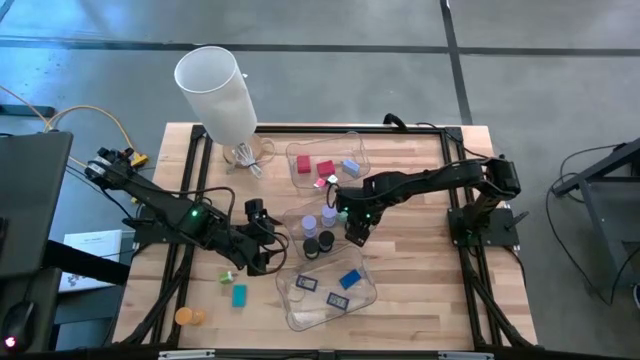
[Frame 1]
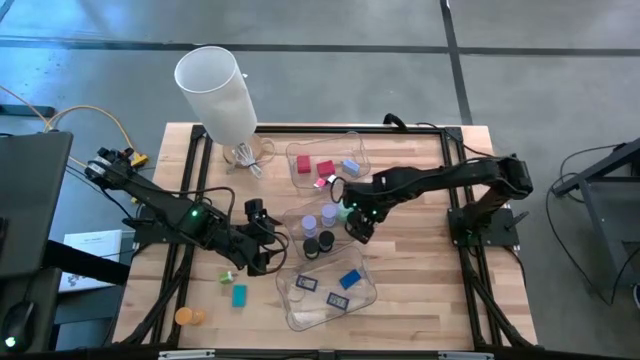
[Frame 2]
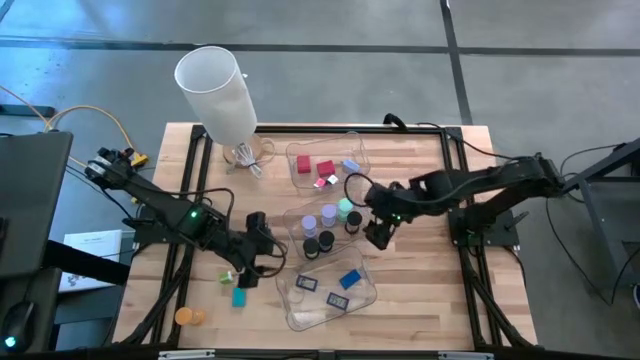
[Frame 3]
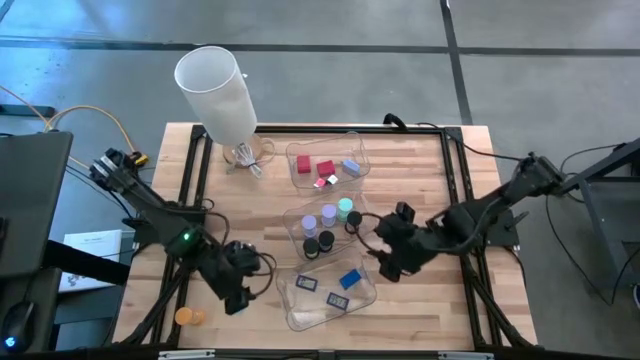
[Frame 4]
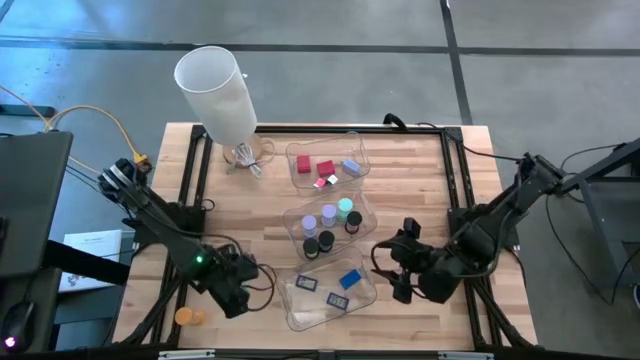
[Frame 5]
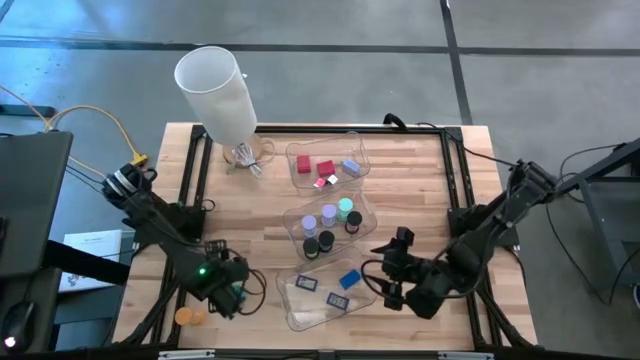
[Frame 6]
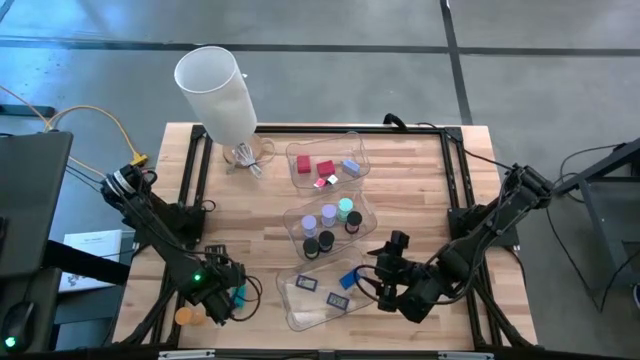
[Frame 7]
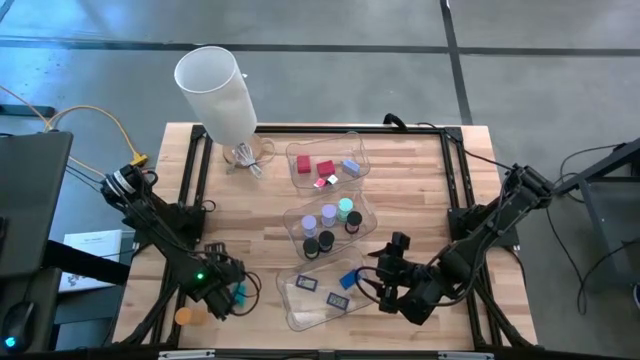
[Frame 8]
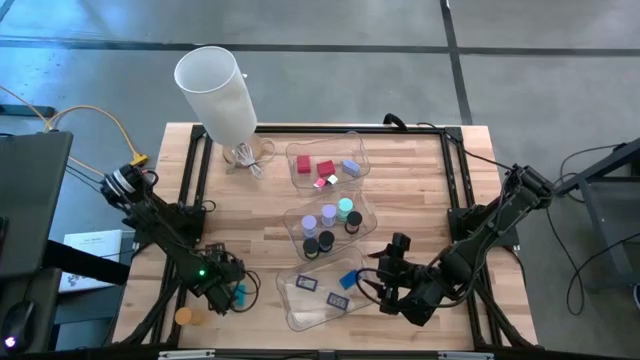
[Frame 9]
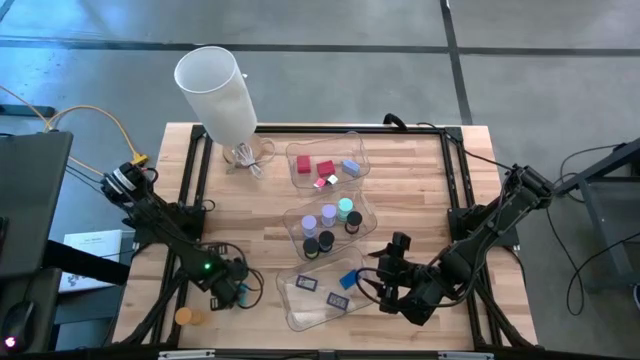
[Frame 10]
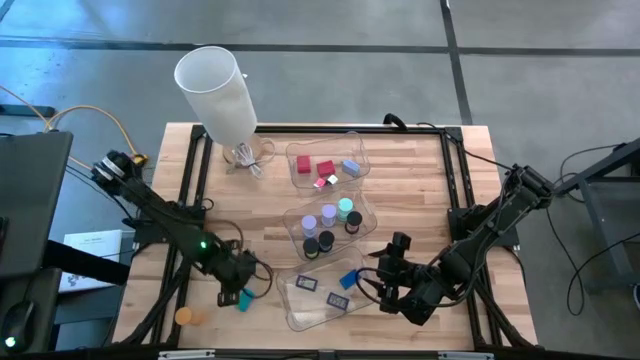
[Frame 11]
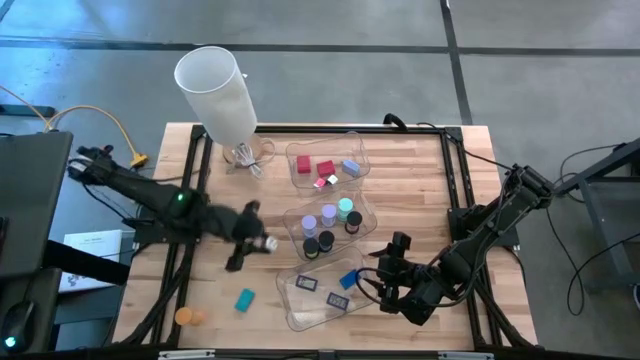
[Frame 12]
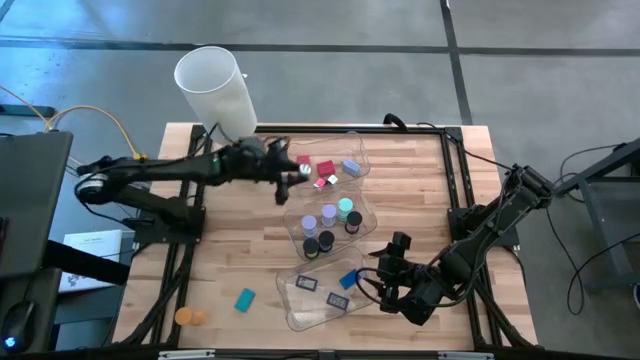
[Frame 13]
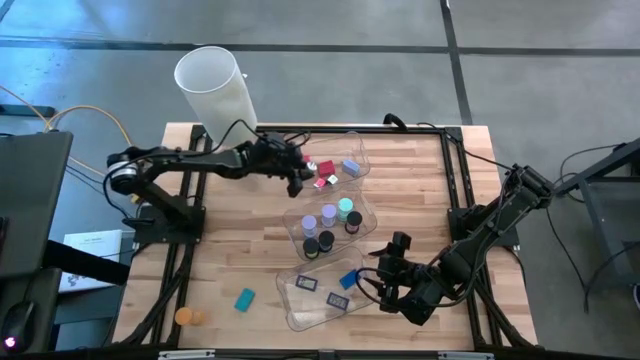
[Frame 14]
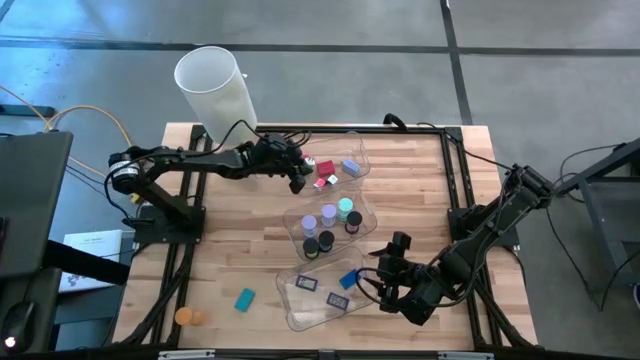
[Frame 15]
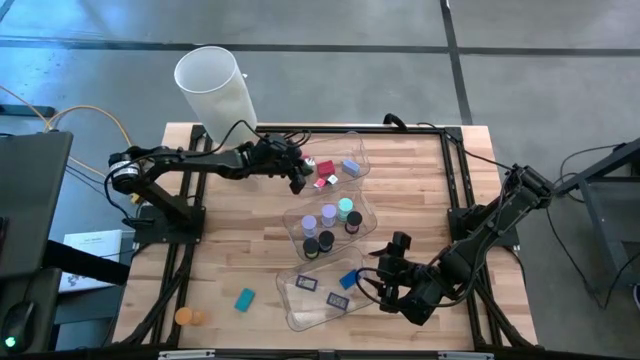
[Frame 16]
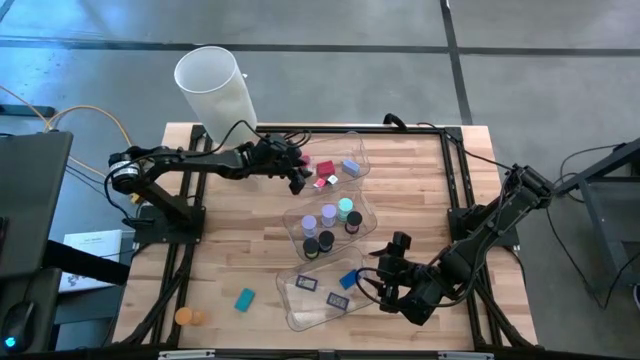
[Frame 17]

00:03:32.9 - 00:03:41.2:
Task: Pick & Place Office items
Put the green charger adapter into the top transparent bin

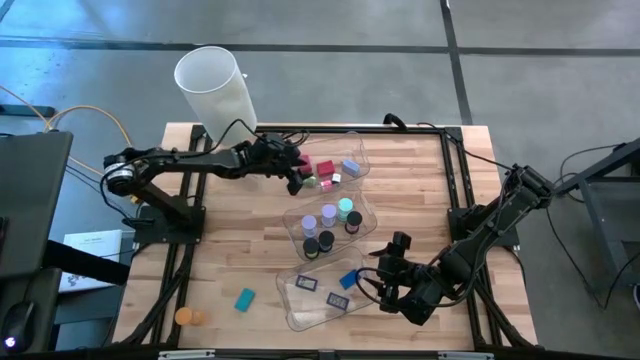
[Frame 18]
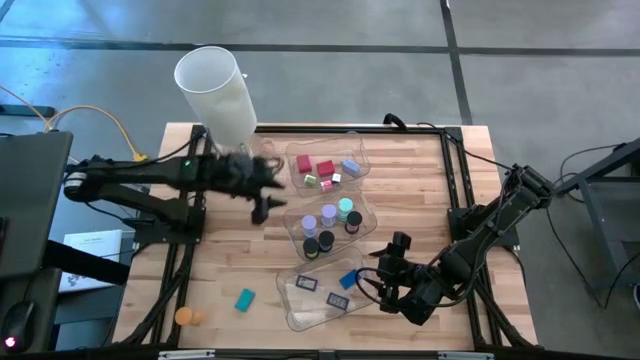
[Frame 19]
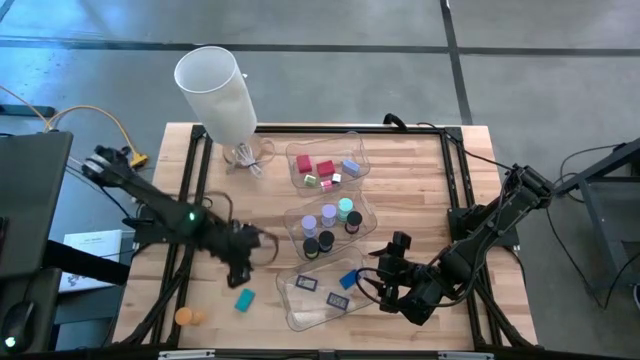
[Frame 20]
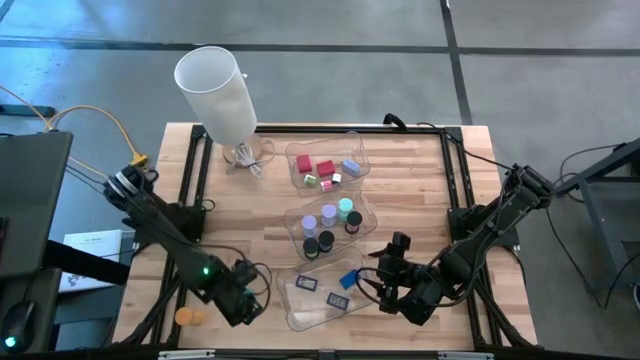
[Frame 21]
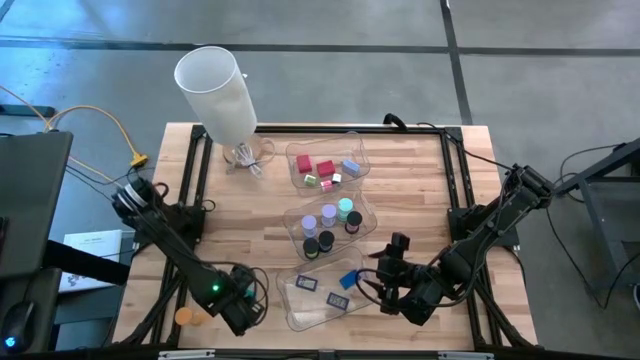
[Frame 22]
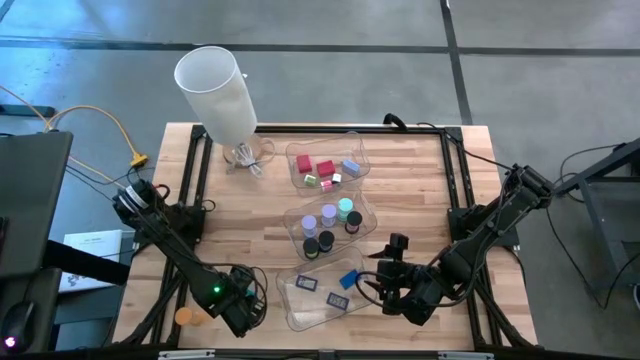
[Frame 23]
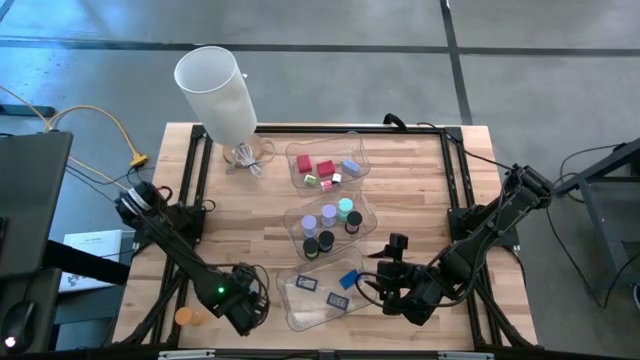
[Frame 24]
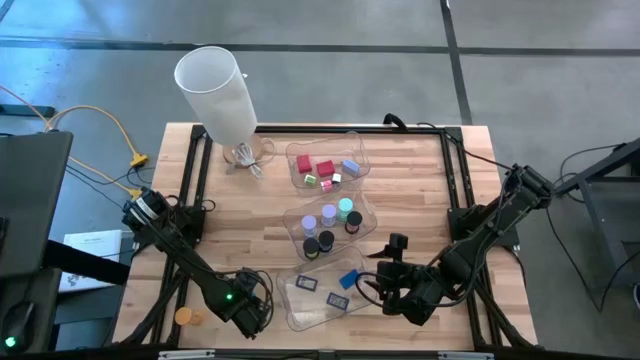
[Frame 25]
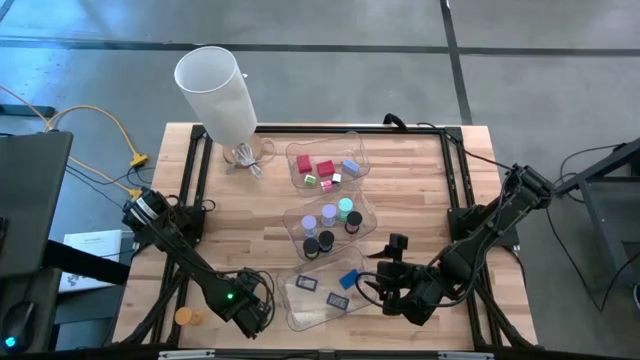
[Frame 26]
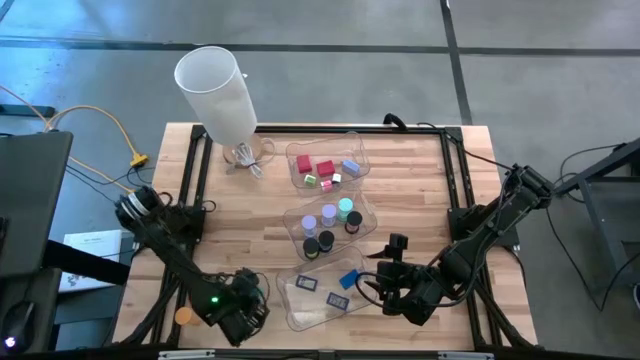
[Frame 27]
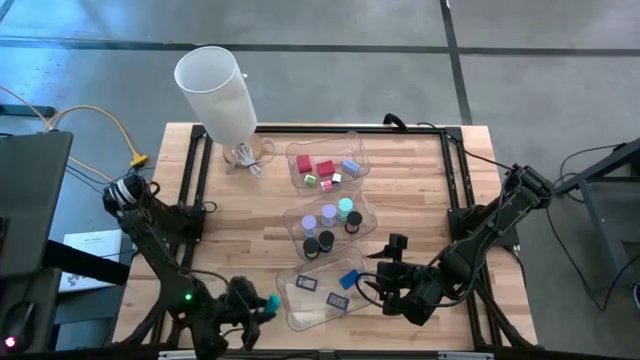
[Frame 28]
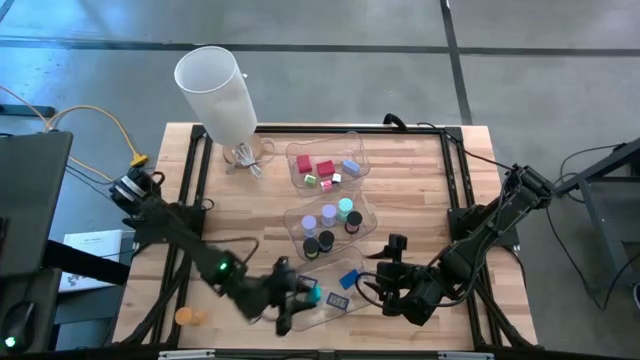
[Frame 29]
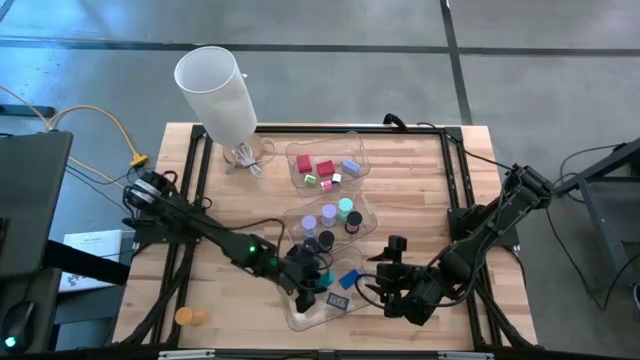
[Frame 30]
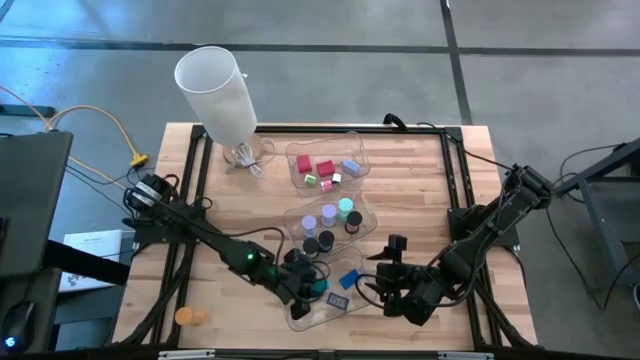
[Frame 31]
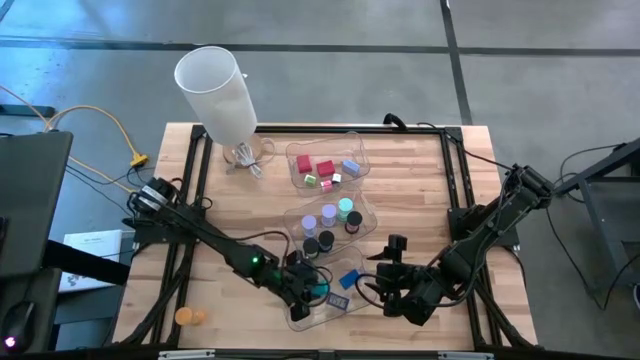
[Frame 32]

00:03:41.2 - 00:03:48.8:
Put the blue digital clock into the bottom transparent bin

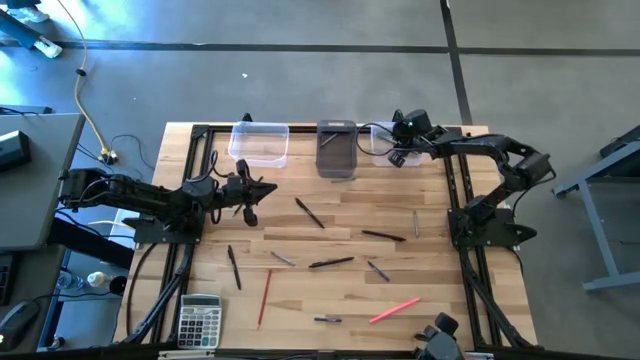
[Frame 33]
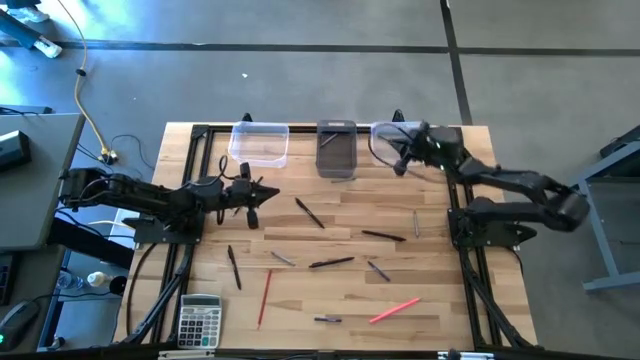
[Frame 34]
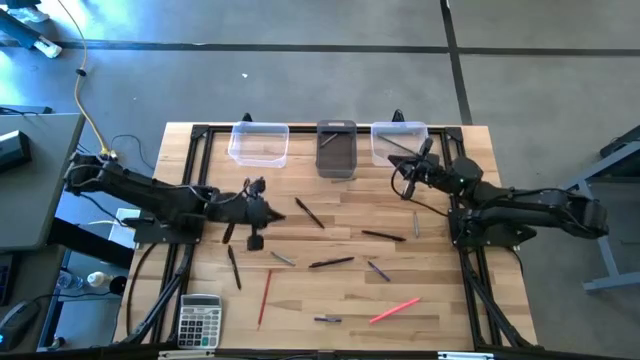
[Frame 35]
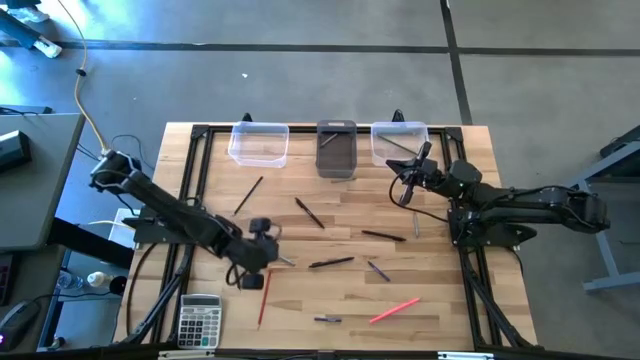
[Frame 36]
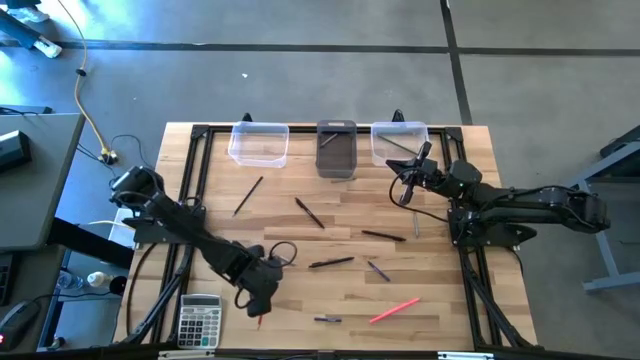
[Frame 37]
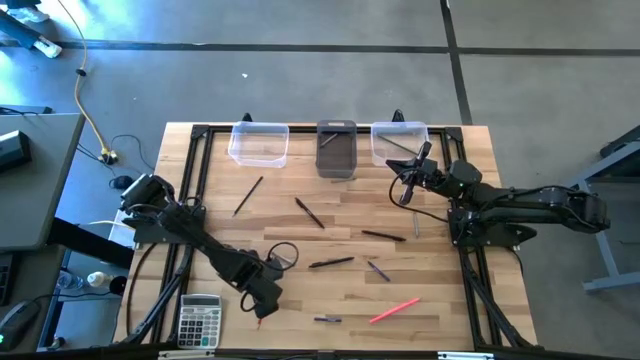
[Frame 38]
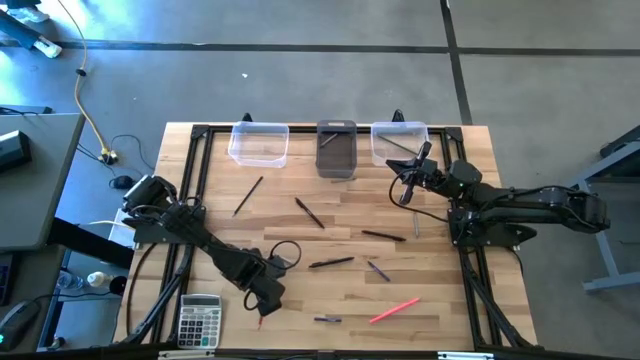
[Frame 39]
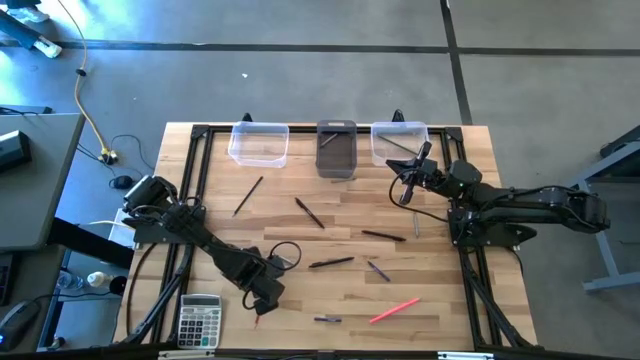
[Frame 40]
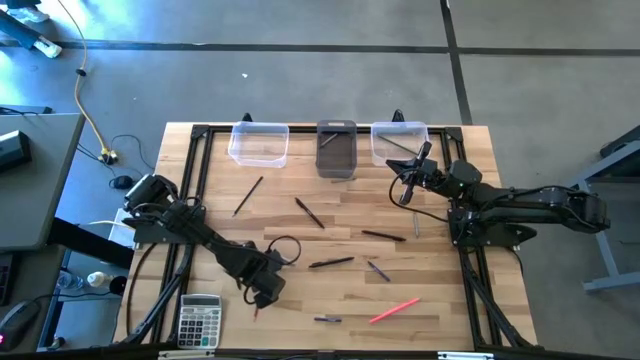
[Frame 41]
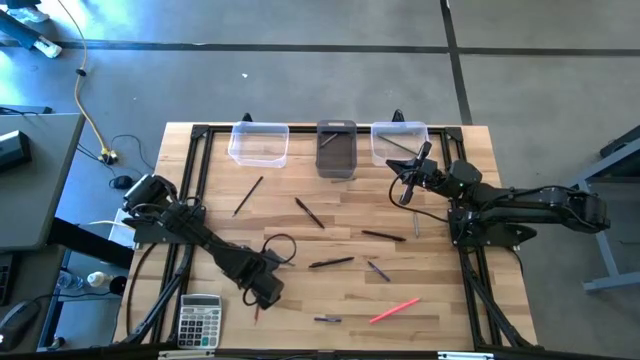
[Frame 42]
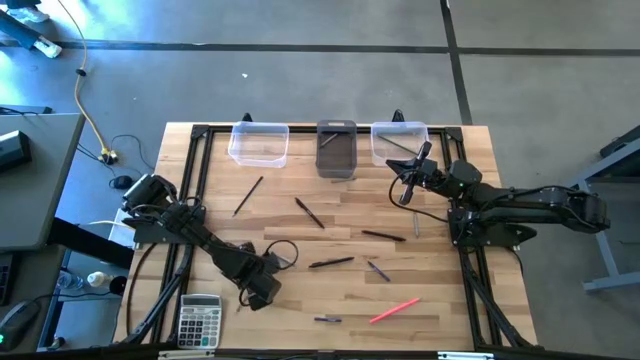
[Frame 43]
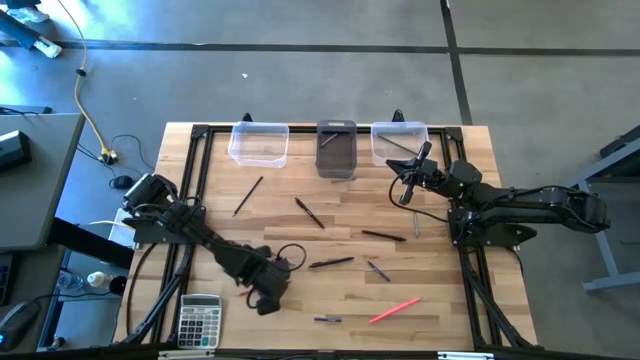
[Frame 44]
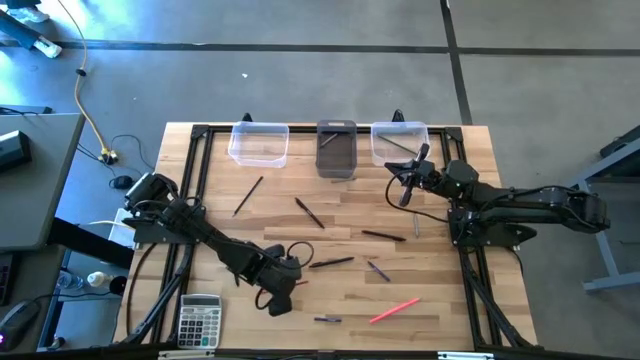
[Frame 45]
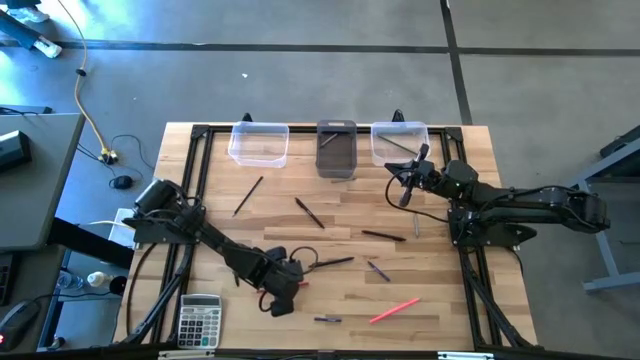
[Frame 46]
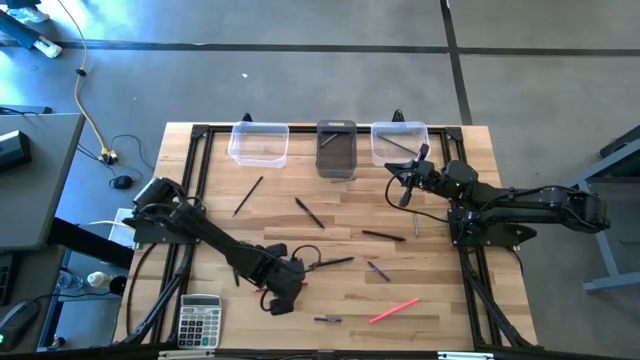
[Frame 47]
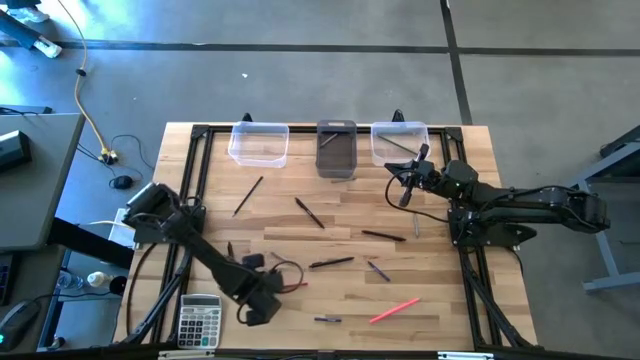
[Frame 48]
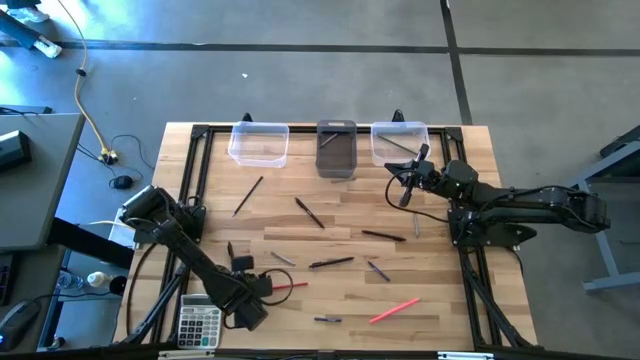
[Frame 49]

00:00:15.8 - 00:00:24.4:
Task: Sort crayons/erasers/pens/pencils in bins
Put the red pencil into the right transparent bin
